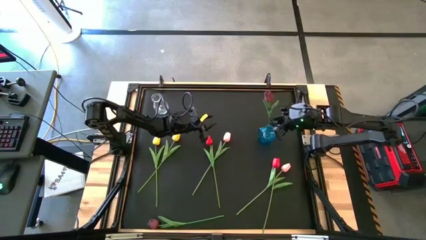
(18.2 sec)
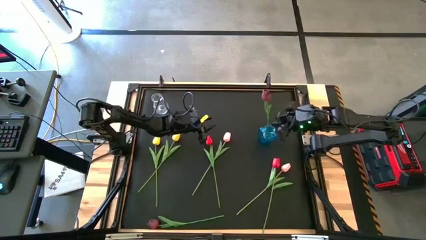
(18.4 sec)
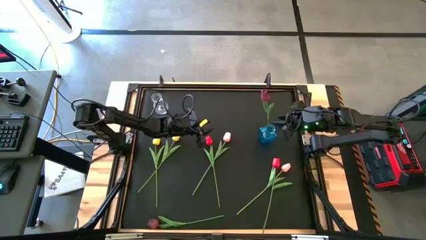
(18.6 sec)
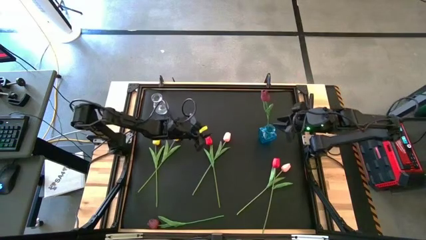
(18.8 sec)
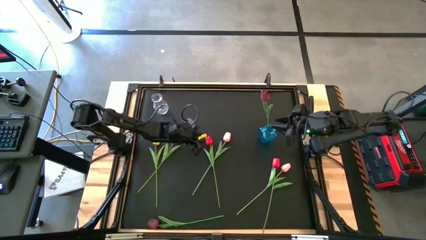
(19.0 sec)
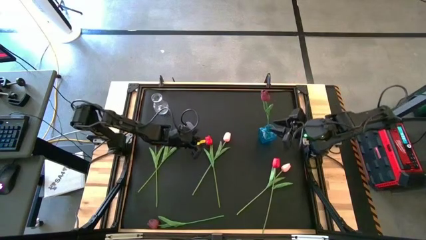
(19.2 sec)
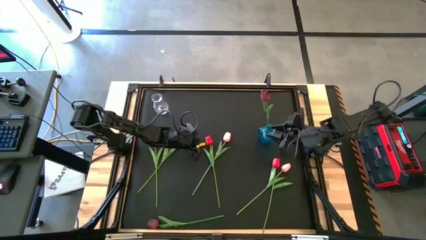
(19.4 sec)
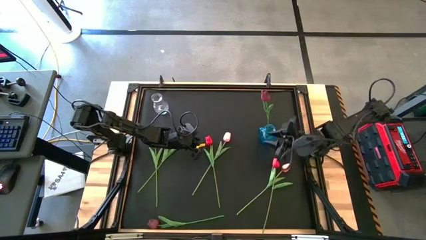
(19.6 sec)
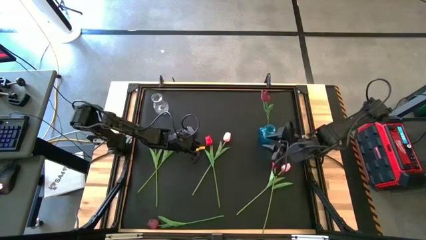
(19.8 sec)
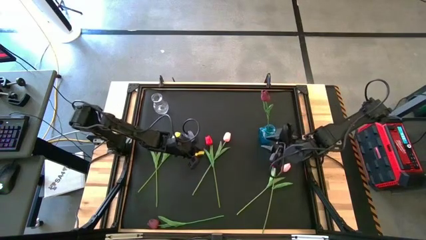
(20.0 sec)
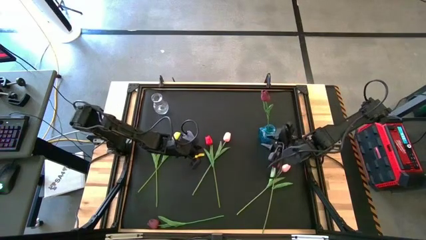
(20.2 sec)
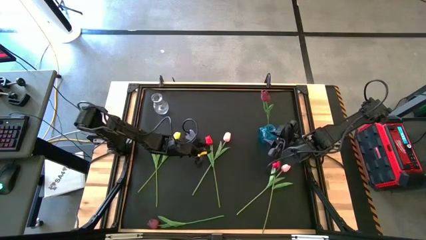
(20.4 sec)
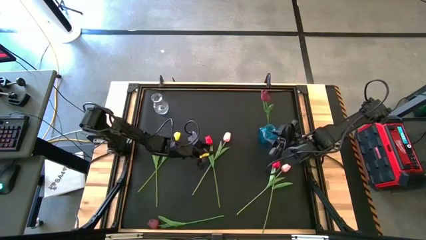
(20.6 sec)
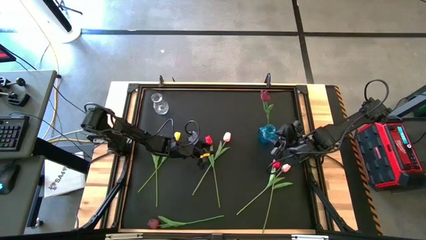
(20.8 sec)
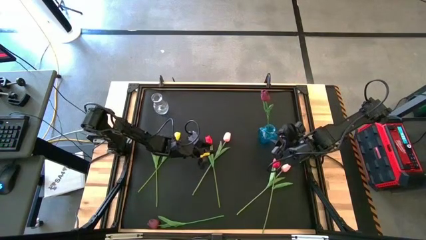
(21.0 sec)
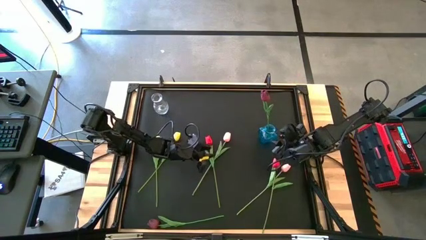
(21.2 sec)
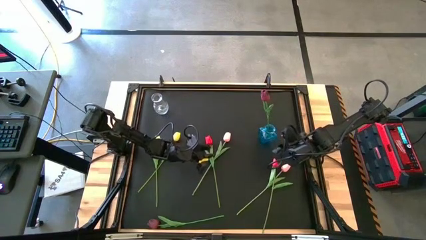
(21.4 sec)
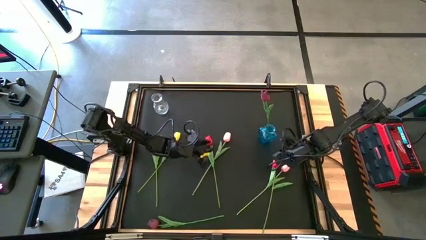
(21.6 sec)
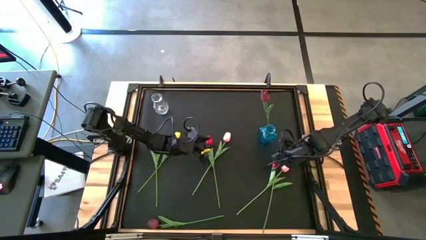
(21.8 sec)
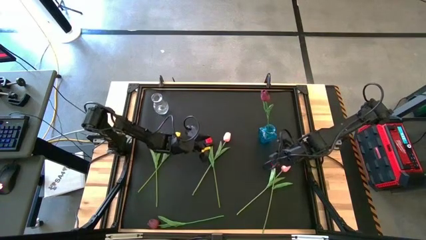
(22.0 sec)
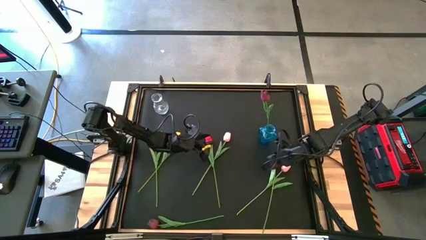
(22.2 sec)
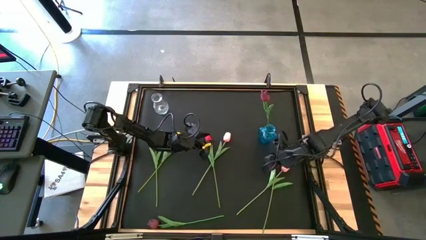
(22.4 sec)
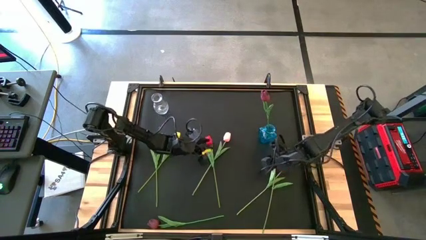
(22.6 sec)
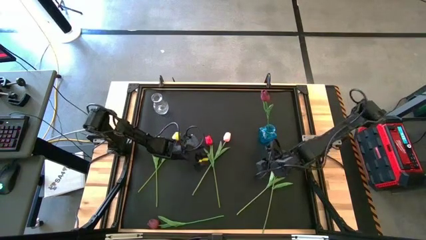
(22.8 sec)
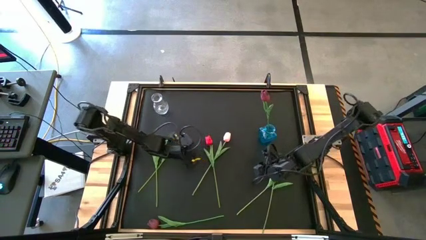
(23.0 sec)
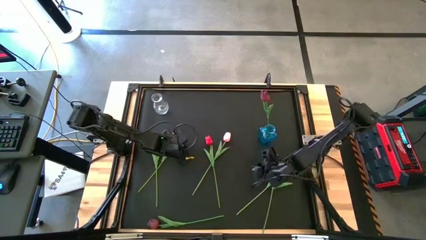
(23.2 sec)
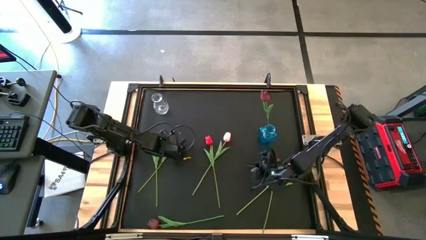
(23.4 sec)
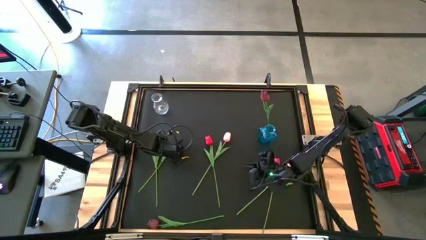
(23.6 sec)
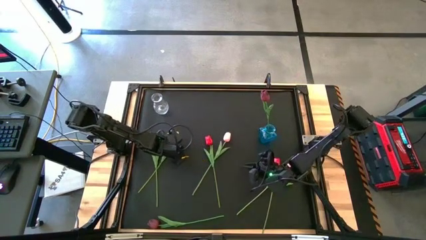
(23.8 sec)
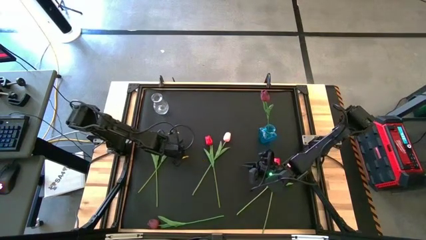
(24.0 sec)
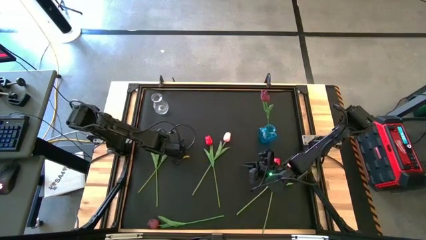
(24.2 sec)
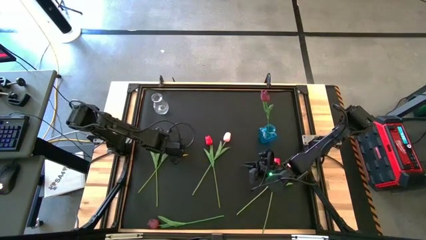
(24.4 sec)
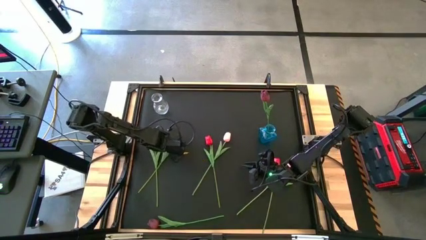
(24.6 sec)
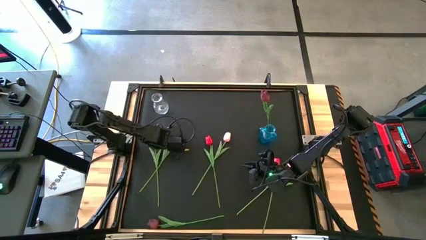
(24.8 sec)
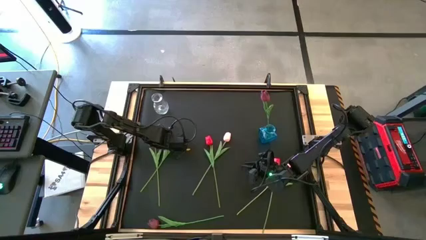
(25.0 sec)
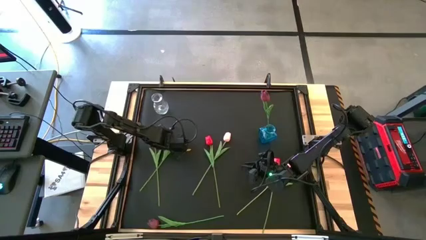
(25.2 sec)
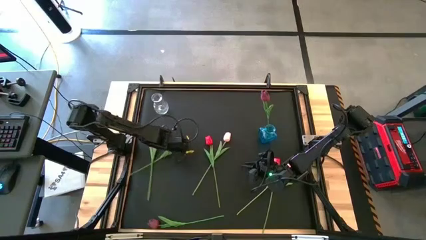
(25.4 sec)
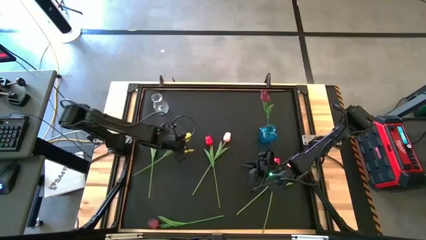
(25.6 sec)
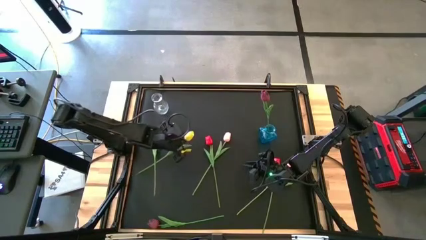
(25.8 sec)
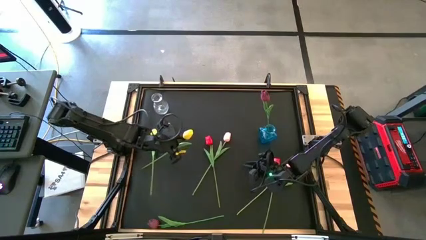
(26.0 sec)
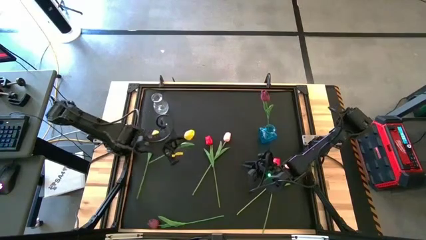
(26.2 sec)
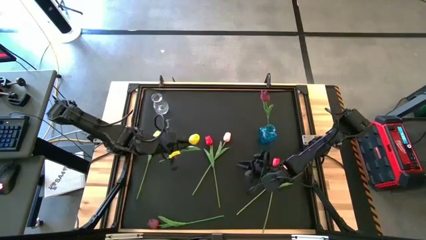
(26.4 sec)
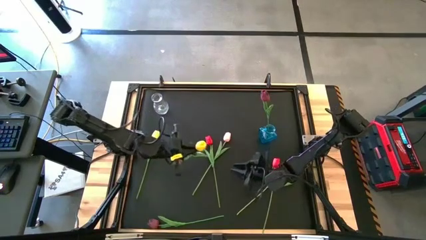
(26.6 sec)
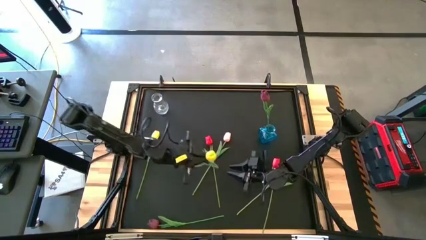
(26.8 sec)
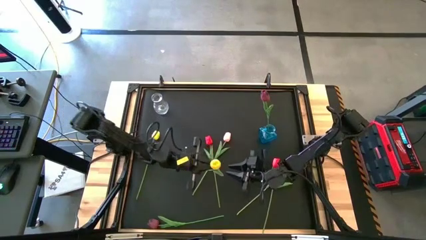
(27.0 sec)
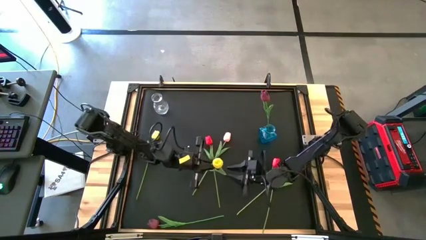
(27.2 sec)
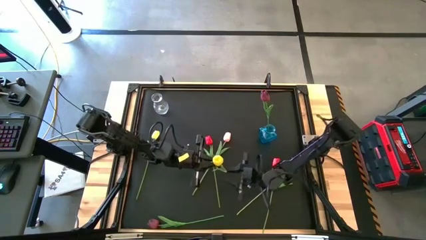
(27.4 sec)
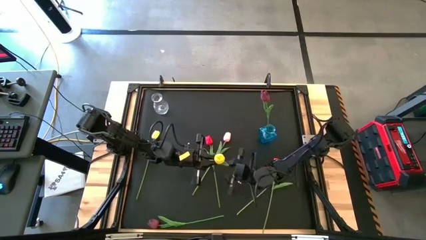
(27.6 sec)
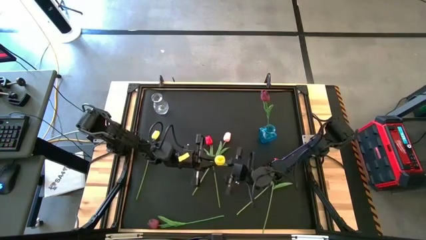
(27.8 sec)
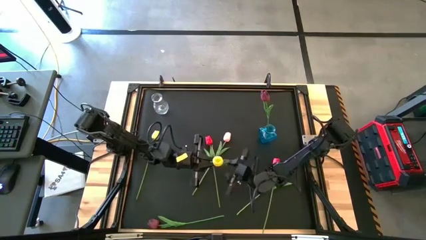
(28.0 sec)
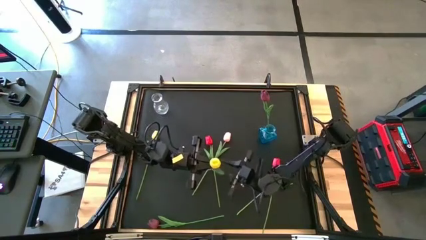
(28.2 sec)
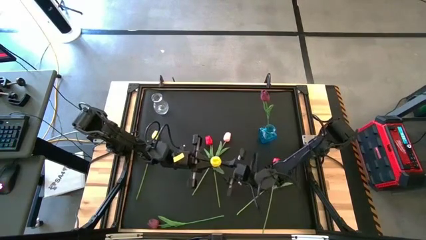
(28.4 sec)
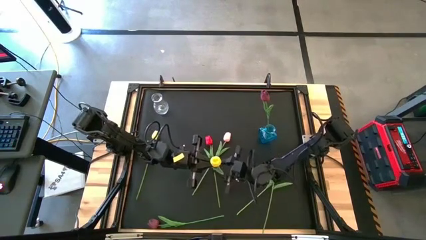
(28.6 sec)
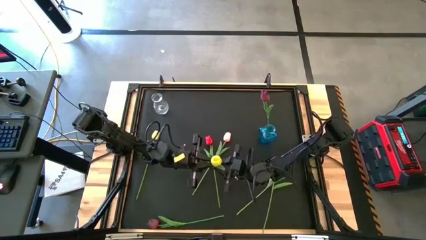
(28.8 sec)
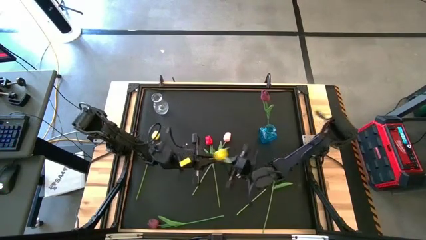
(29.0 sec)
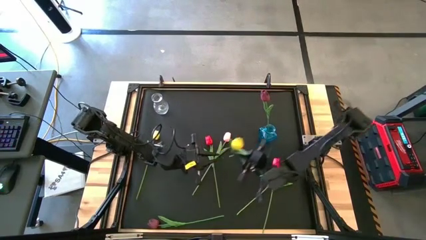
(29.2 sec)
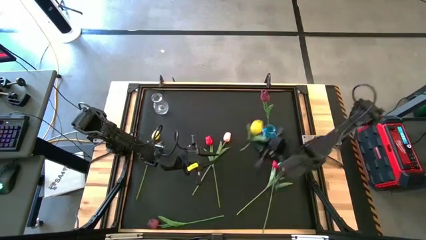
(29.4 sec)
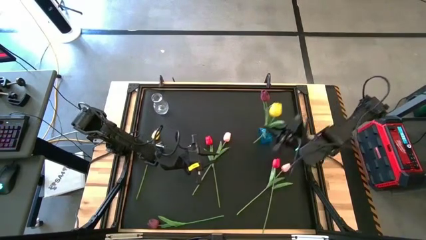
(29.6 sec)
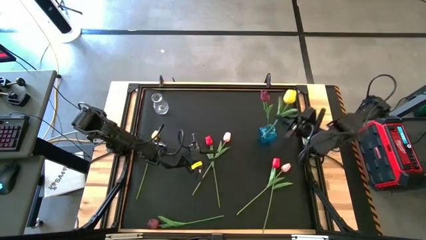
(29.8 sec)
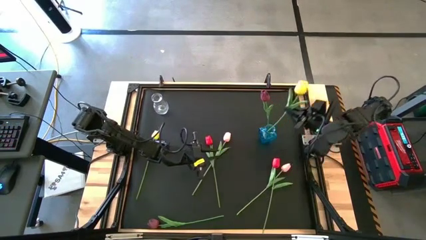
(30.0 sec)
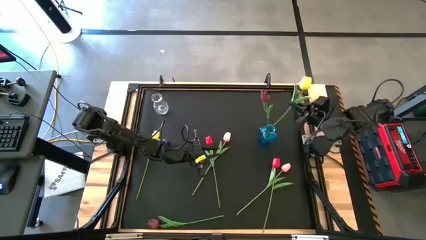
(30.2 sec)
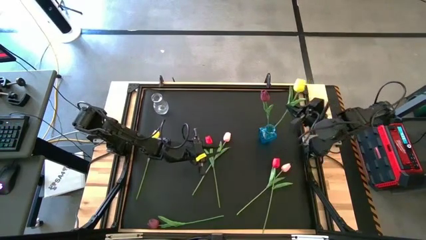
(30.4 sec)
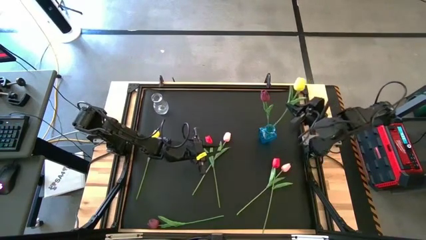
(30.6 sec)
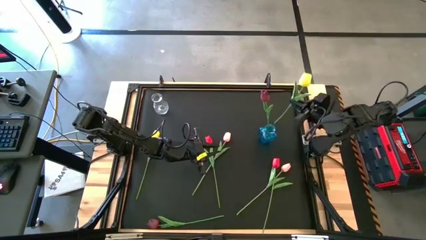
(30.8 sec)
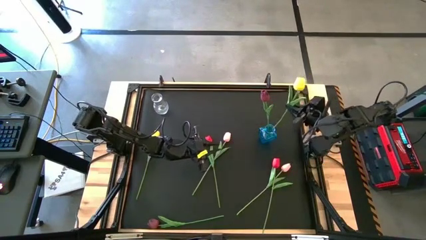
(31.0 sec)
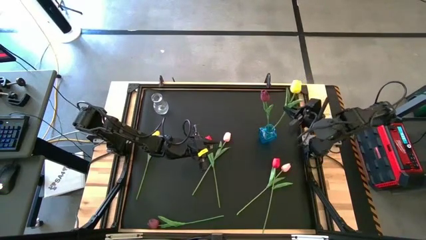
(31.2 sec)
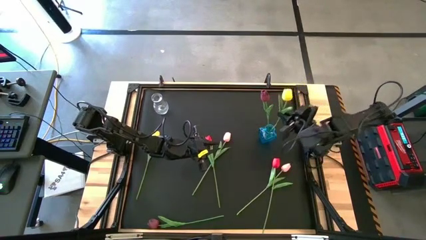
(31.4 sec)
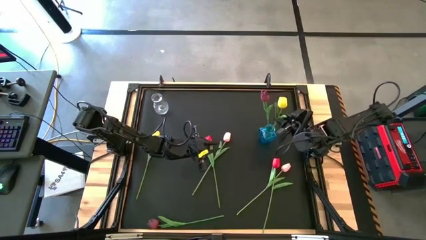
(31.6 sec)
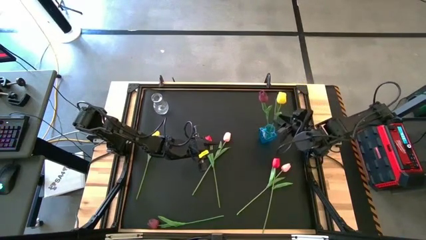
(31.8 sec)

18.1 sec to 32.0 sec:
Task: Sort flowers into vase by color
Put the right yellow flower into the blue vase
